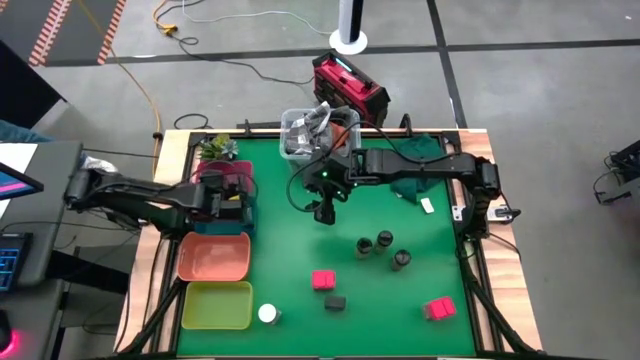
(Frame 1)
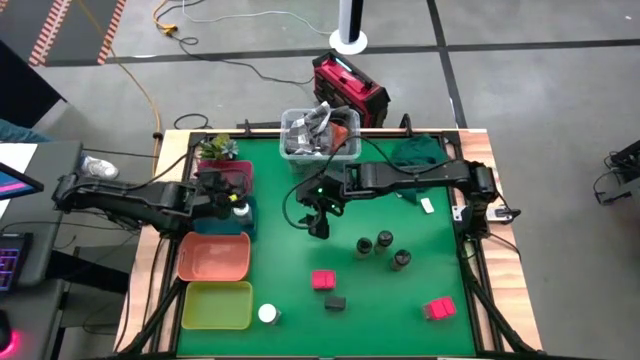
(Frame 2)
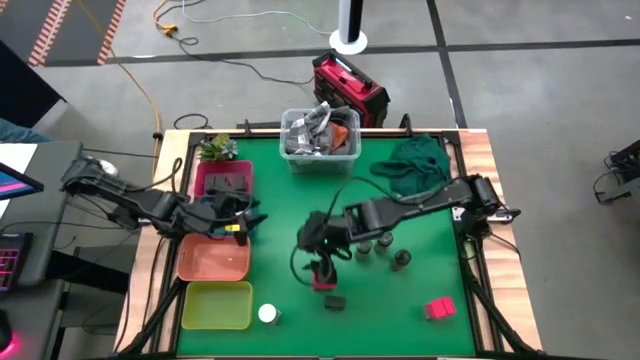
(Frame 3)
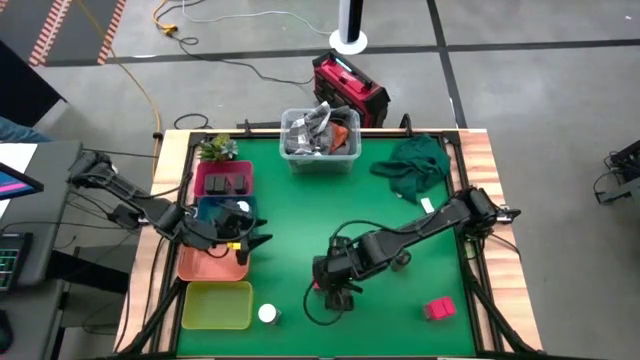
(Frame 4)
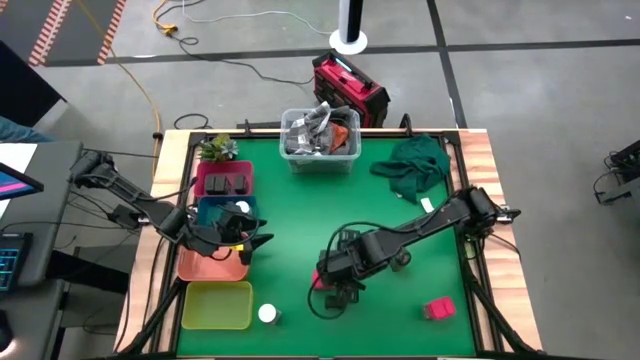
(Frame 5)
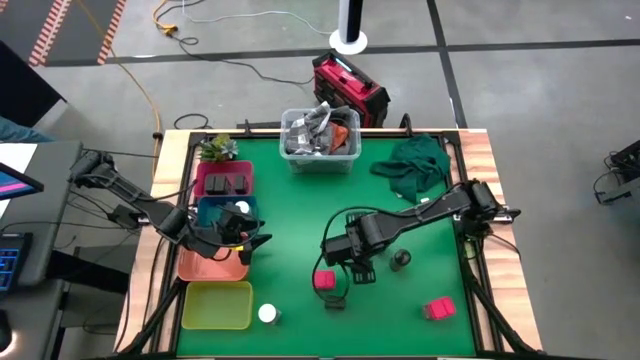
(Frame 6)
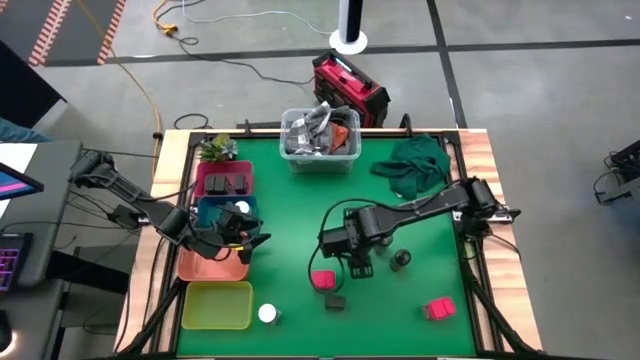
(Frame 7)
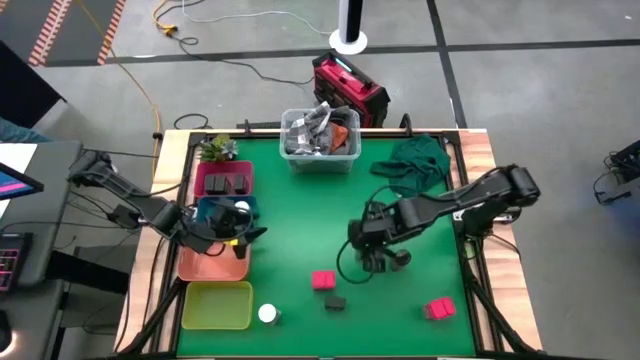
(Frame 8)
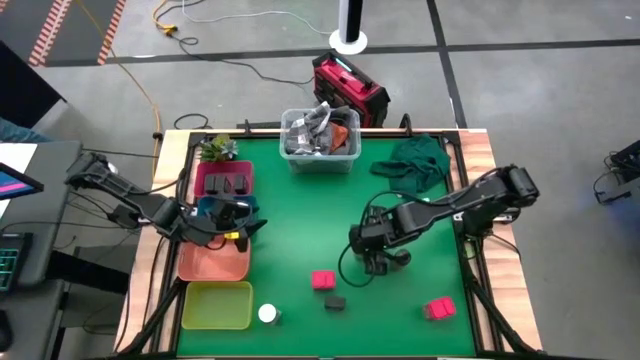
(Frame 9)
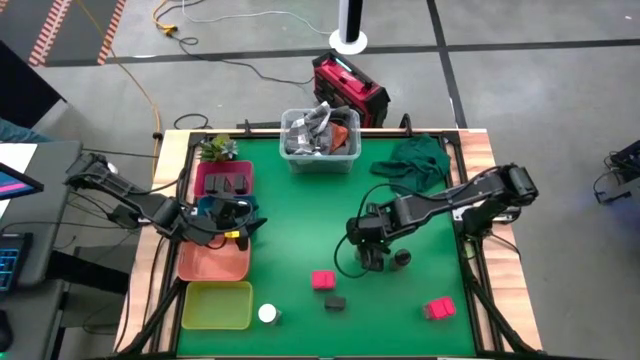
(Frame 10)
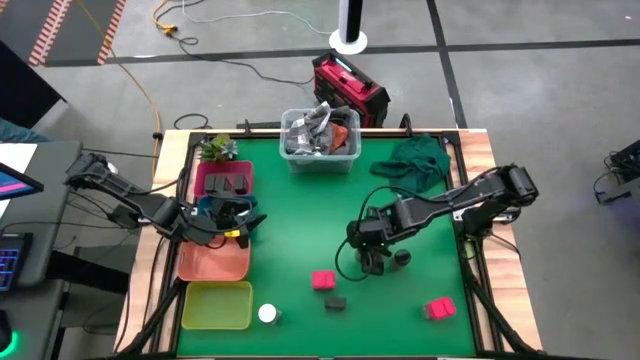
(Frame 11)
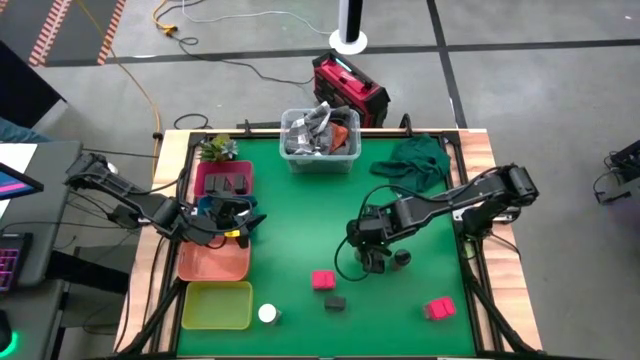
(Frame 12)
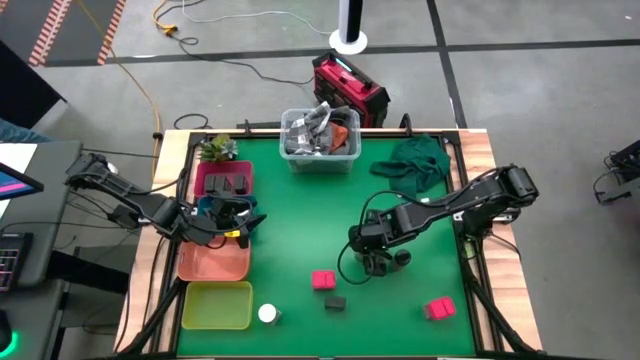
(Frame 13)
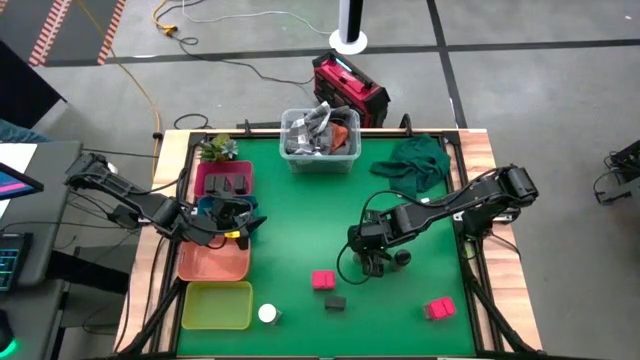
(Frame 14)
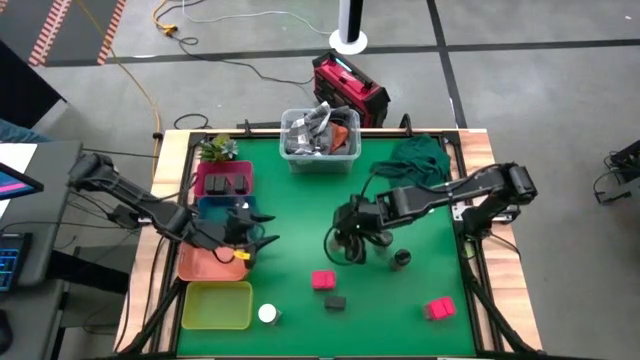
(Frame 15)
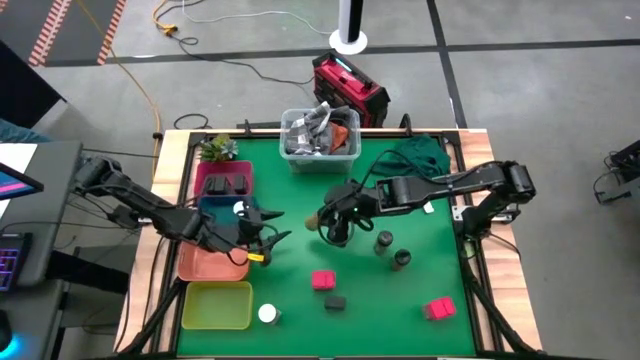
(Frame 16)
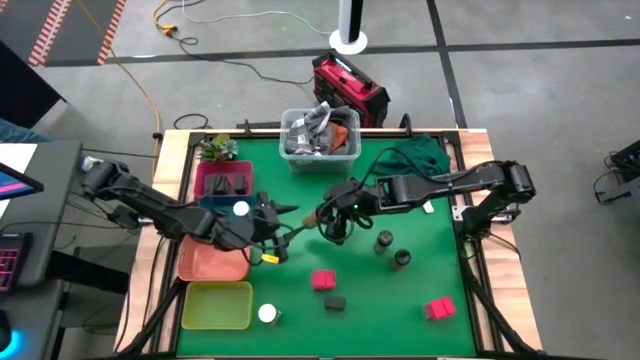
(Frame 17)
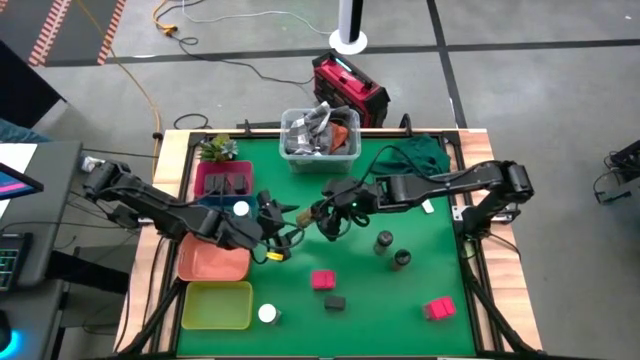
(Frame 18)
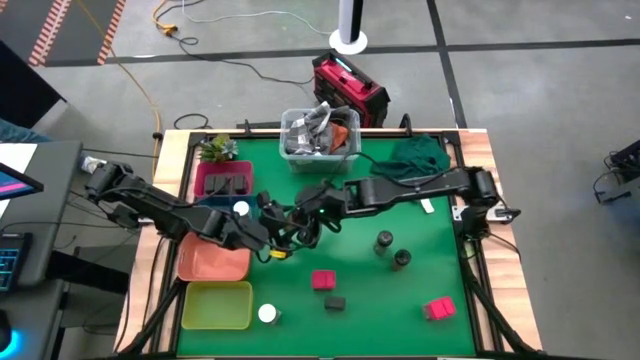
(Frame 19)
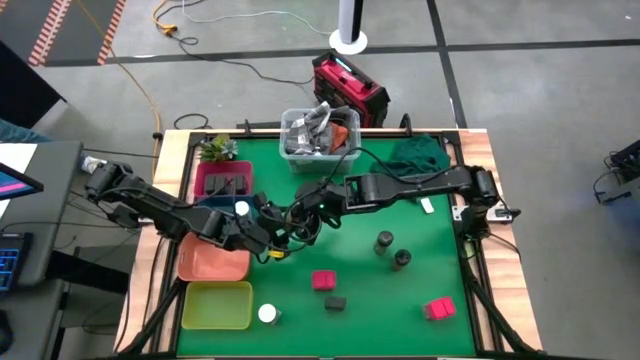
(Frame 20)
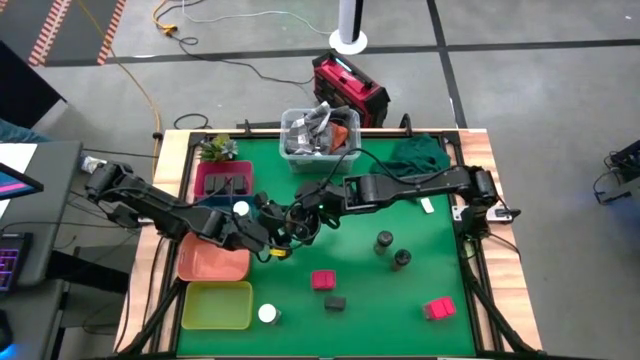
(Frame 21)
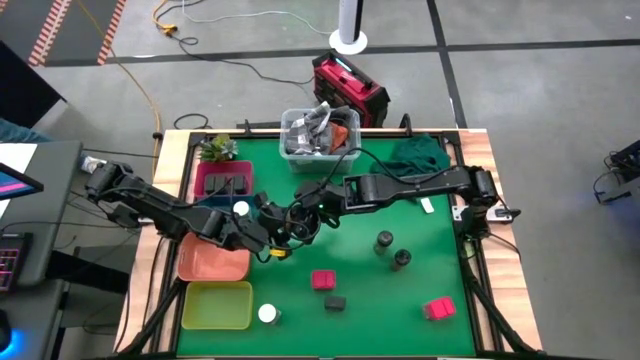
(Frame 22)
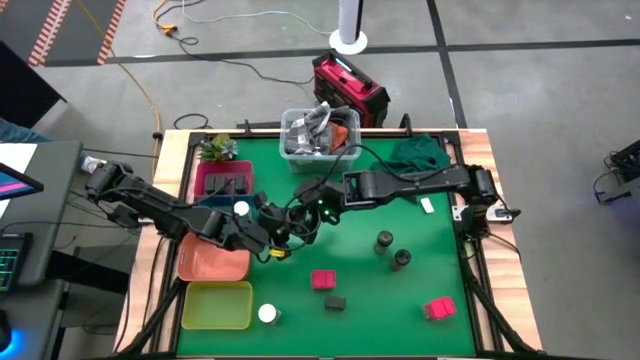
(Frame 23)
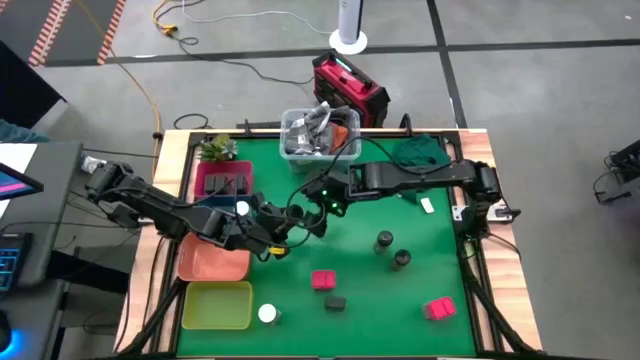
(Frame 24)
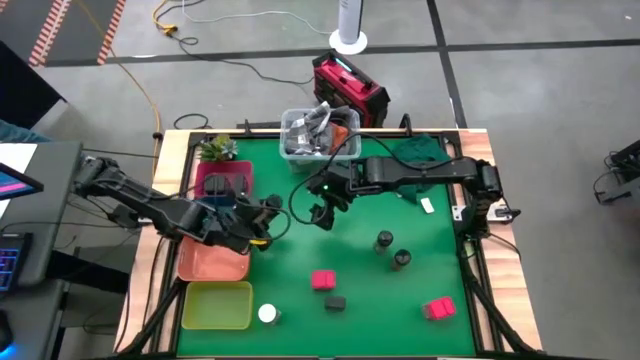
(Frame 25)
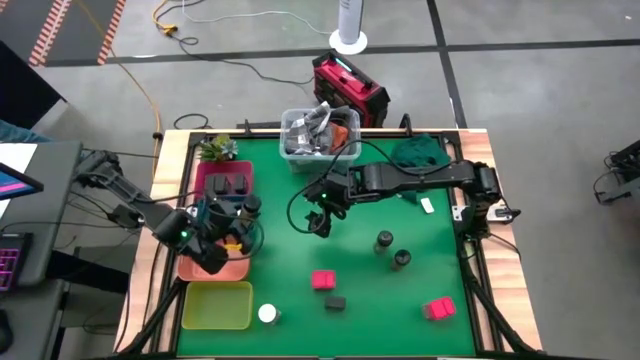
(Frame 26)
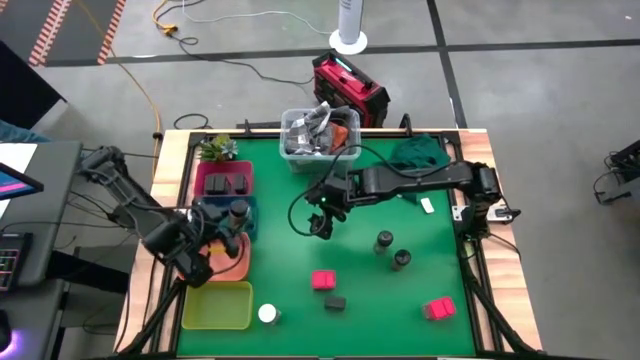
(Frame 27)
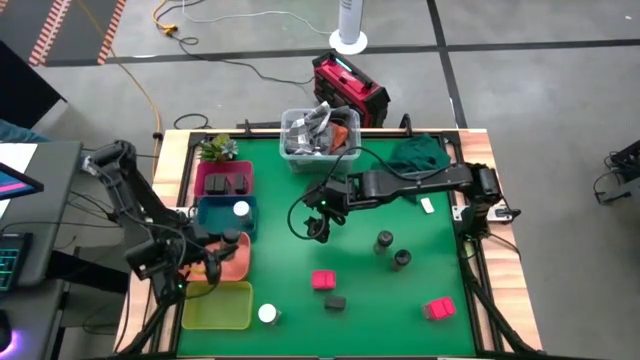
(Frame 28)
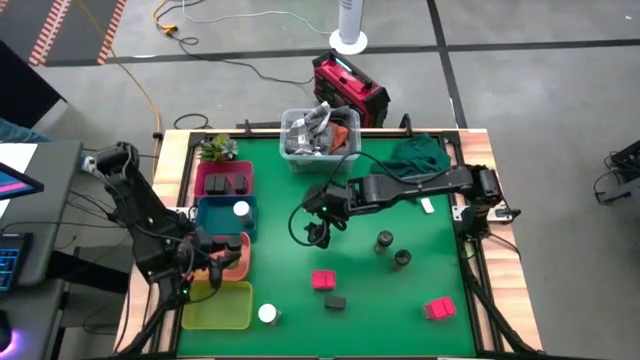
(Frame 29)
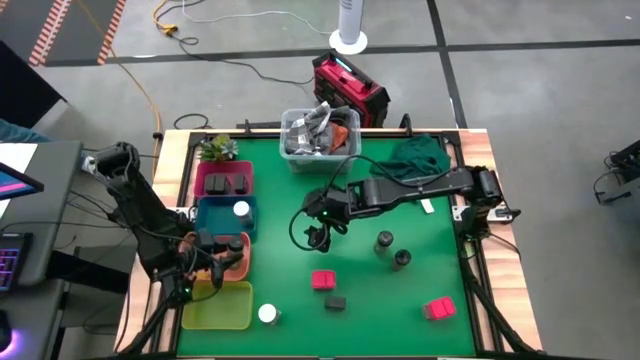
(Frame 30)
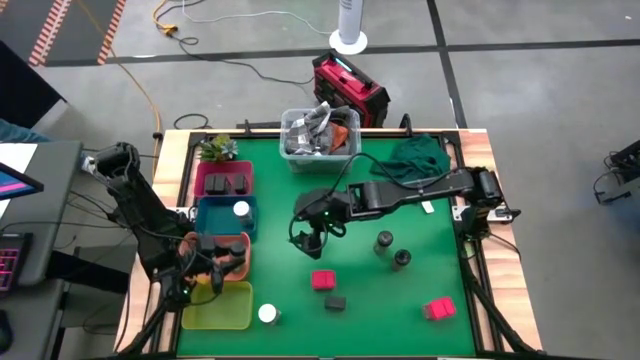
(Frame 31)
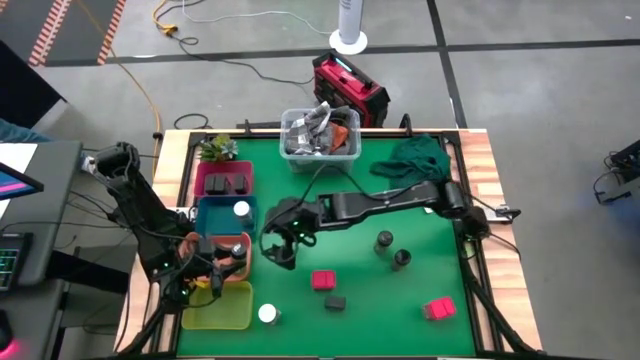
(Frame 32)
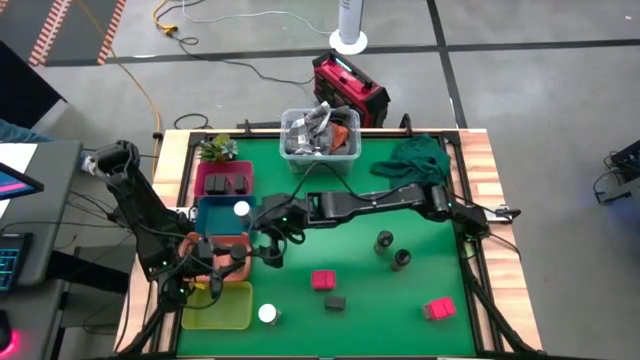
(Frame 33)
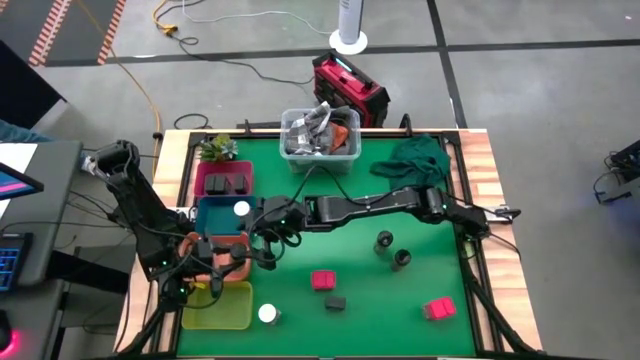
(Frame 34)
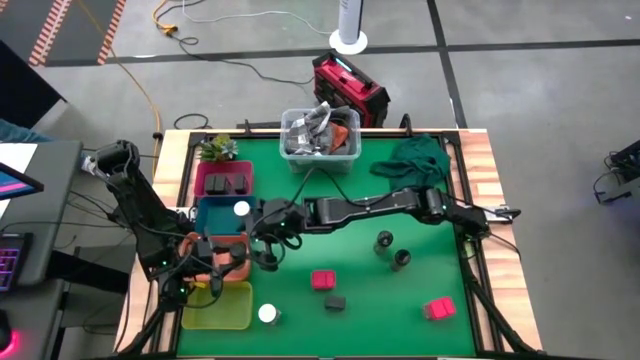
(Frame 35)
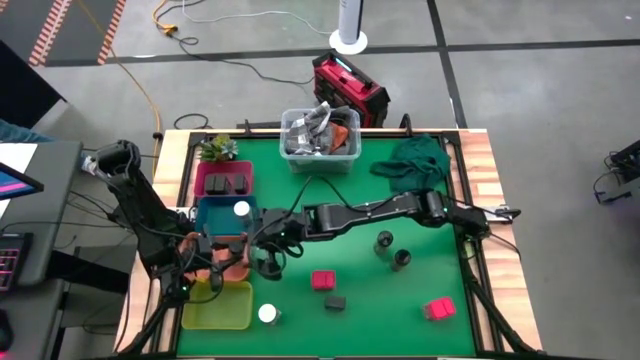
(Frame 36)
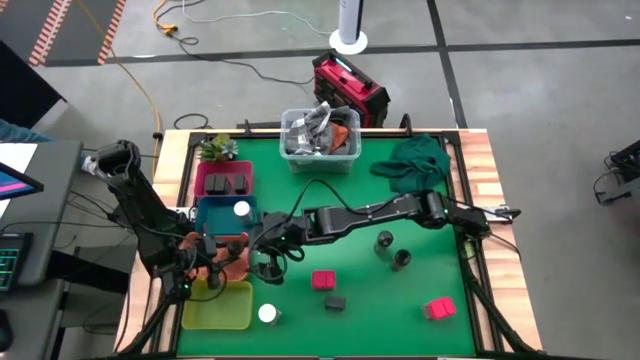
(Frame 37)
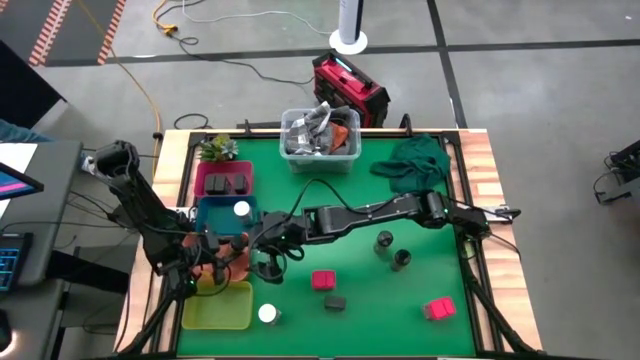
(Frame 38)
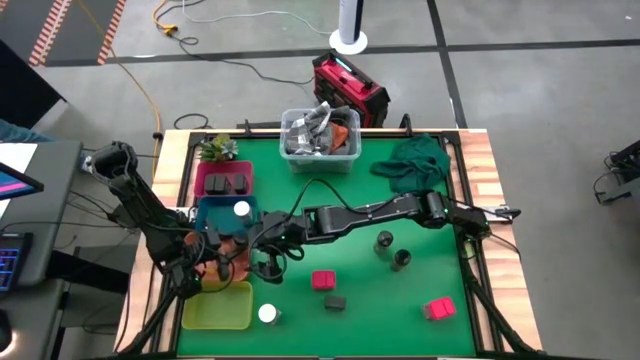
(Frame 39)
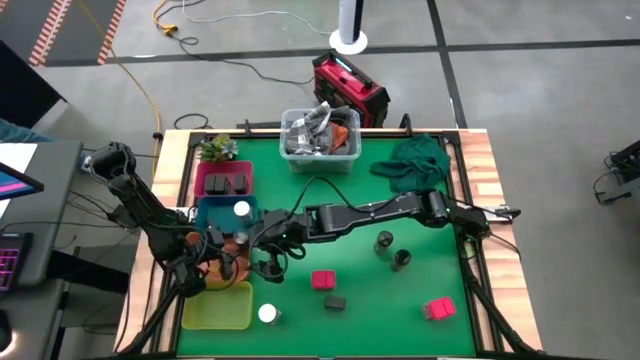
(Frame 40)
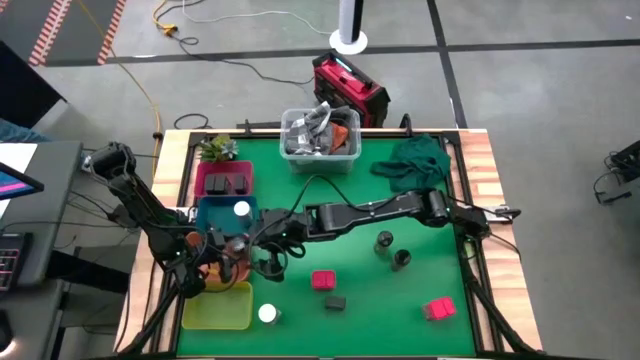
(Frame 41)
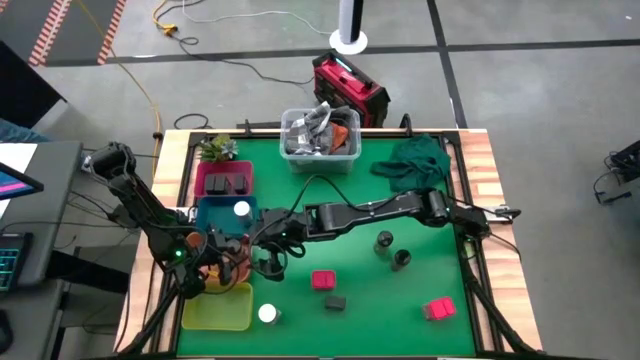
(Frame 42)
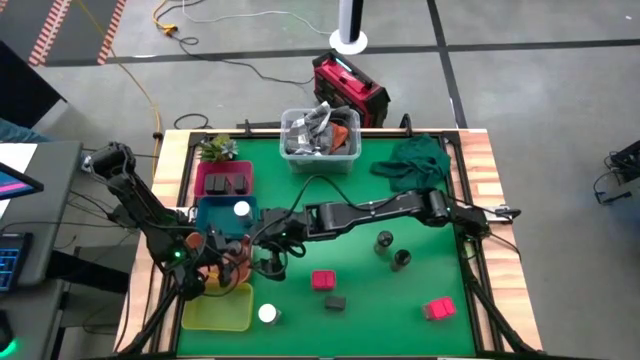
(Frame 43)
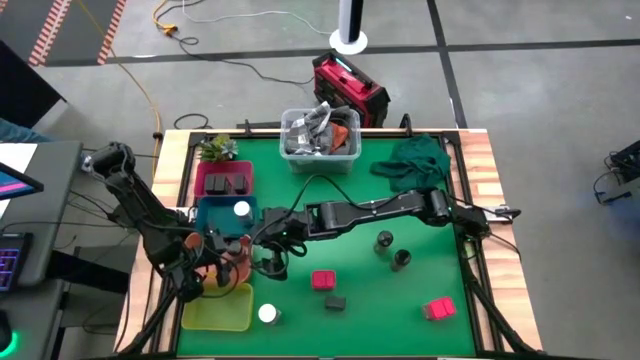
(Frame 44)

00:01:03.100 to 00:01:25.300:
Task: Sort spices by type
Put the top left black seasoning bottle into the orange bin
